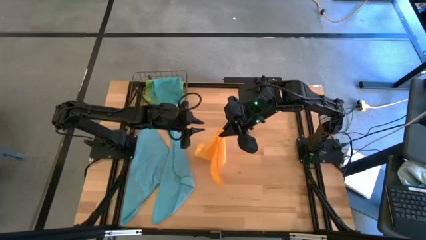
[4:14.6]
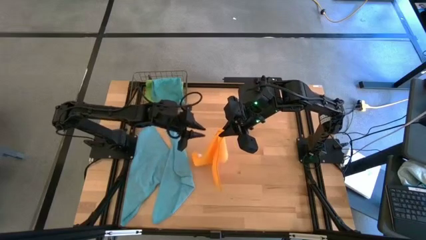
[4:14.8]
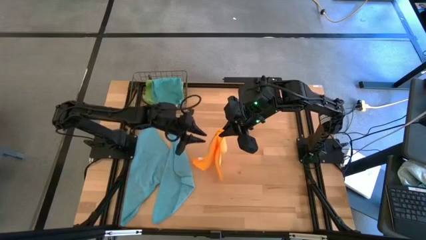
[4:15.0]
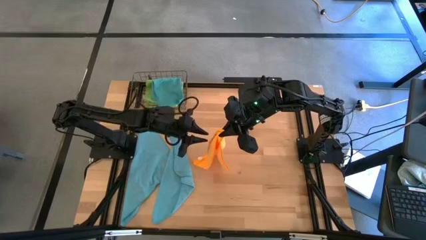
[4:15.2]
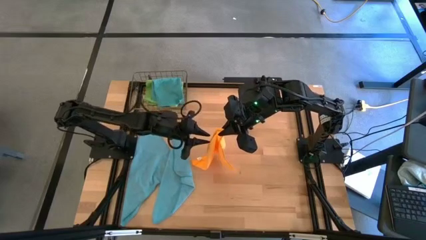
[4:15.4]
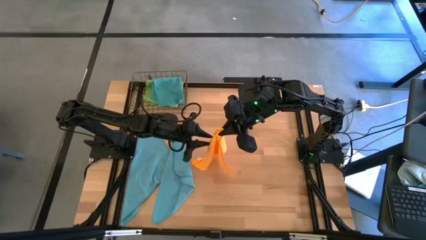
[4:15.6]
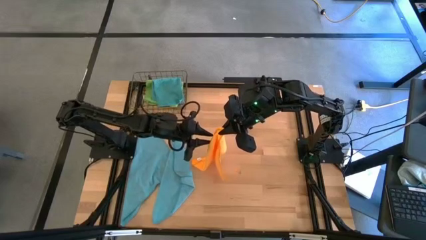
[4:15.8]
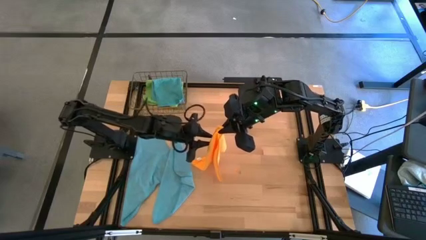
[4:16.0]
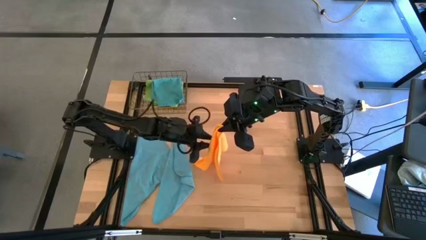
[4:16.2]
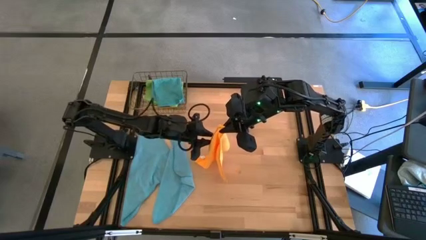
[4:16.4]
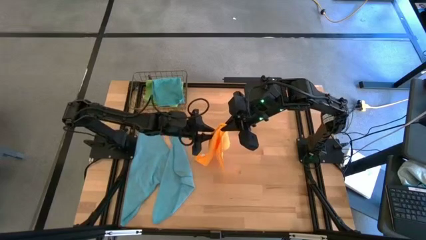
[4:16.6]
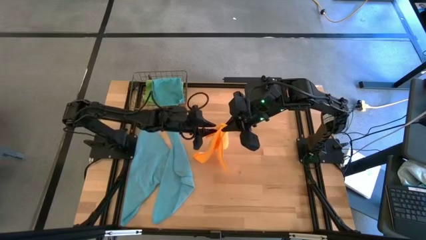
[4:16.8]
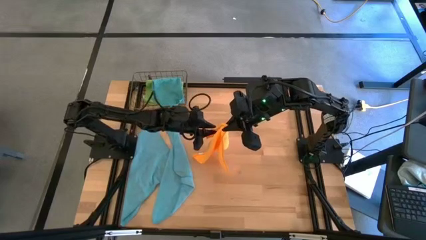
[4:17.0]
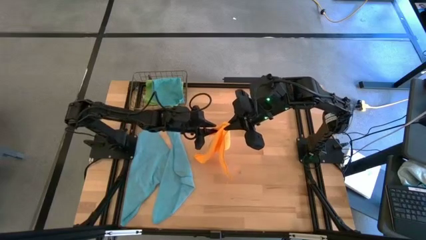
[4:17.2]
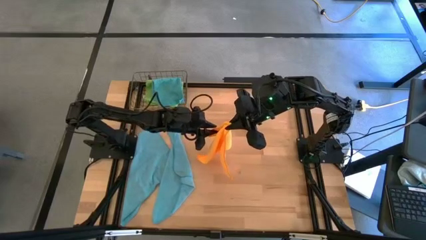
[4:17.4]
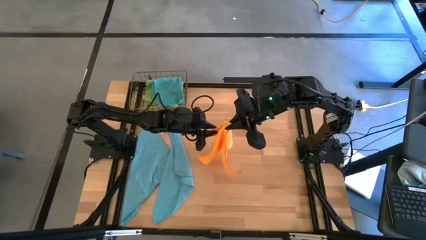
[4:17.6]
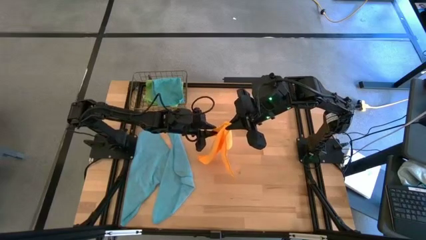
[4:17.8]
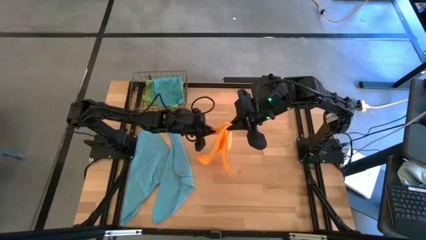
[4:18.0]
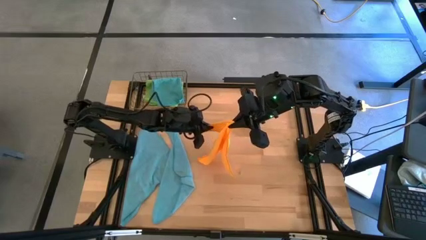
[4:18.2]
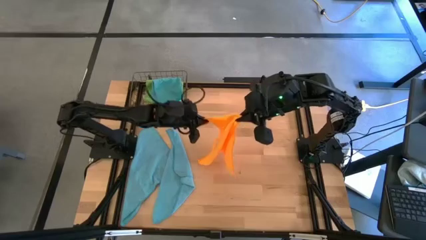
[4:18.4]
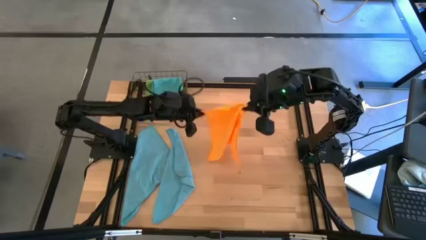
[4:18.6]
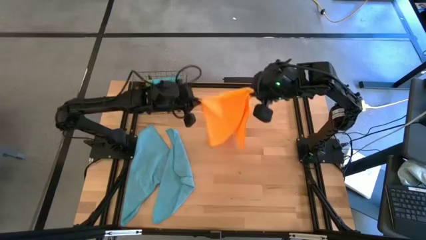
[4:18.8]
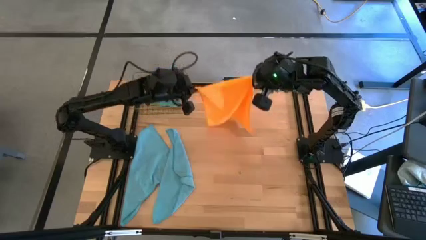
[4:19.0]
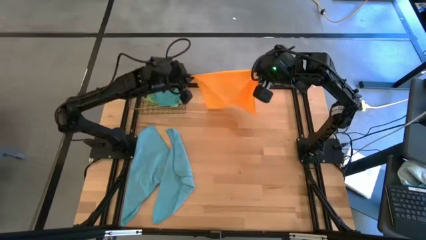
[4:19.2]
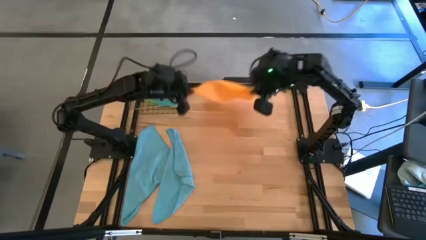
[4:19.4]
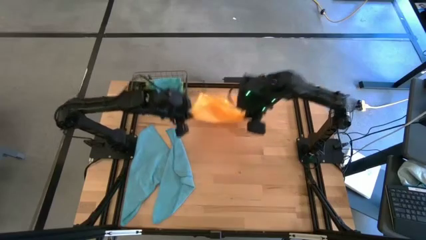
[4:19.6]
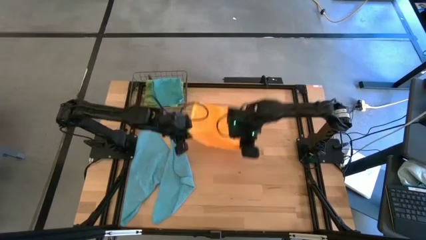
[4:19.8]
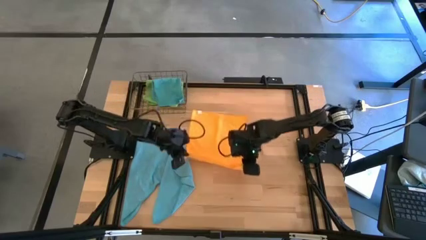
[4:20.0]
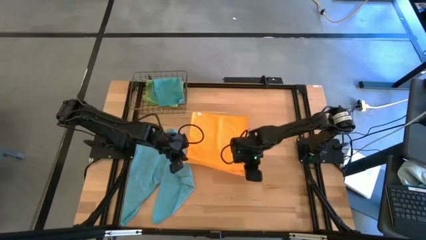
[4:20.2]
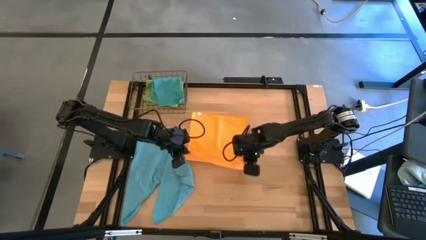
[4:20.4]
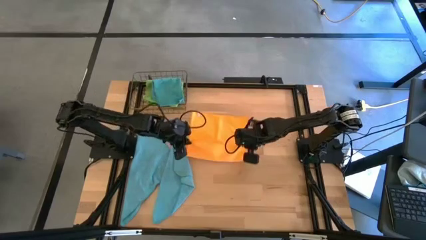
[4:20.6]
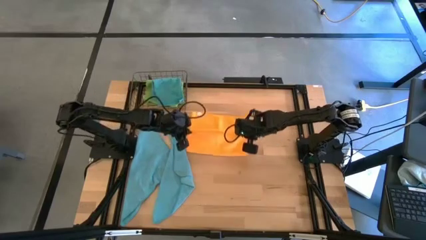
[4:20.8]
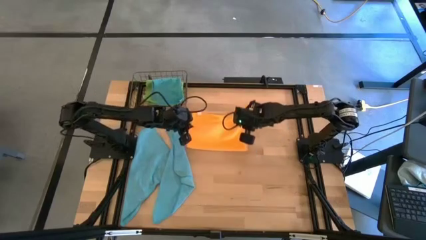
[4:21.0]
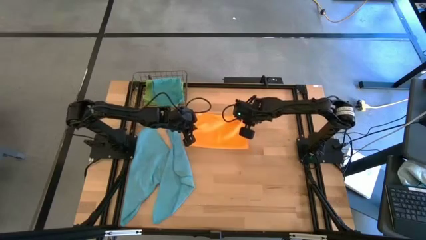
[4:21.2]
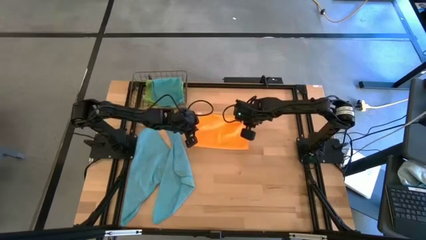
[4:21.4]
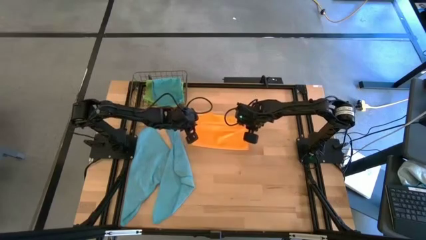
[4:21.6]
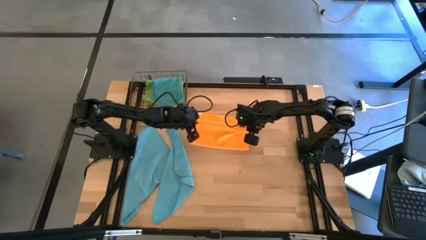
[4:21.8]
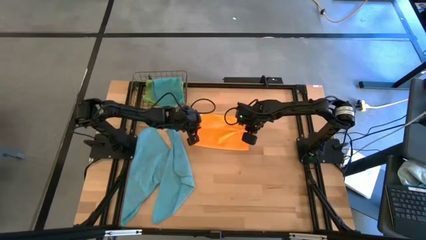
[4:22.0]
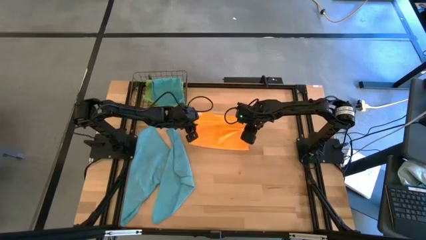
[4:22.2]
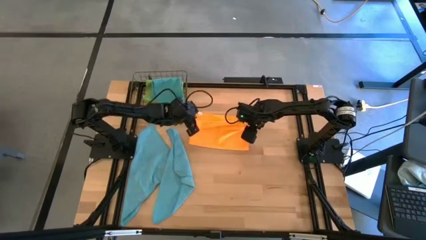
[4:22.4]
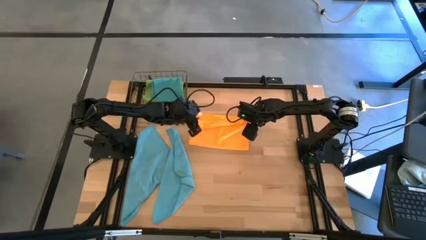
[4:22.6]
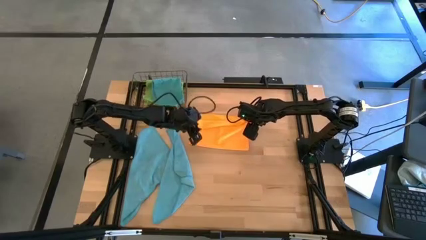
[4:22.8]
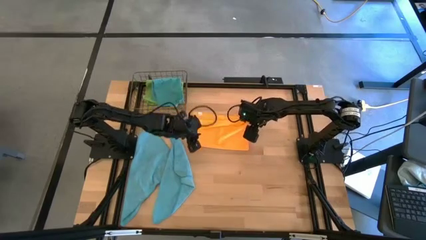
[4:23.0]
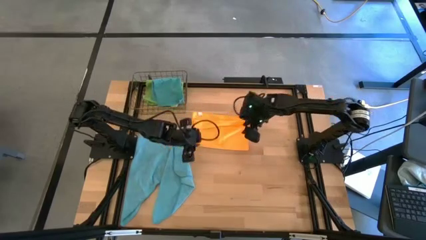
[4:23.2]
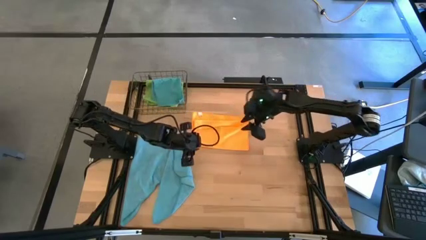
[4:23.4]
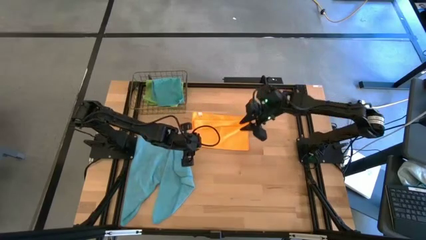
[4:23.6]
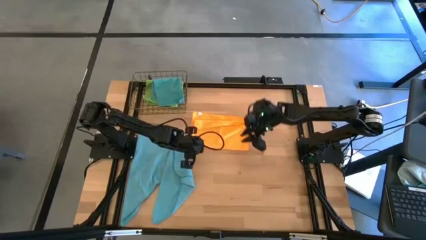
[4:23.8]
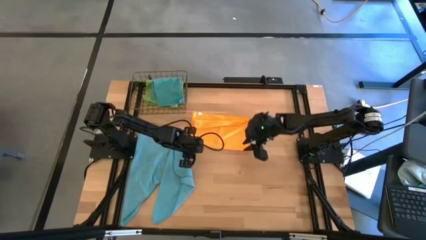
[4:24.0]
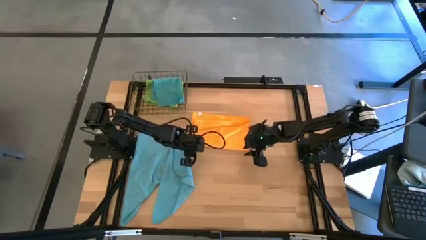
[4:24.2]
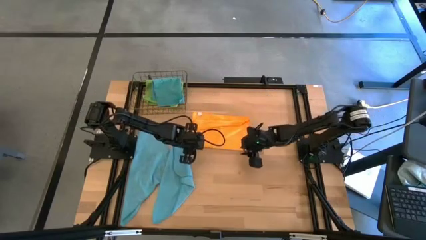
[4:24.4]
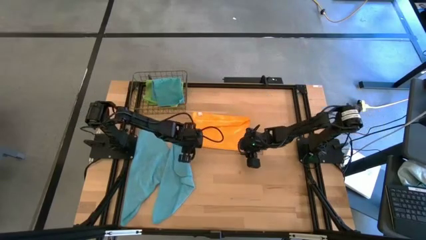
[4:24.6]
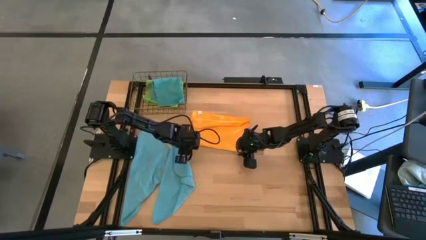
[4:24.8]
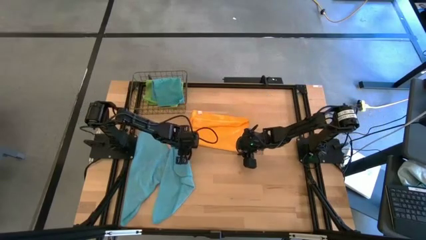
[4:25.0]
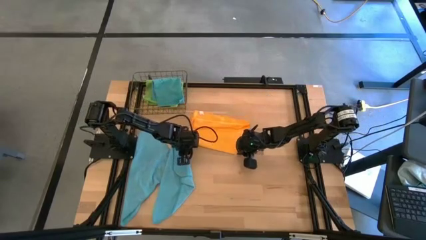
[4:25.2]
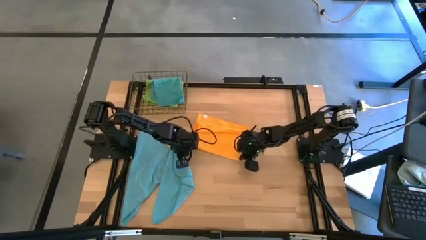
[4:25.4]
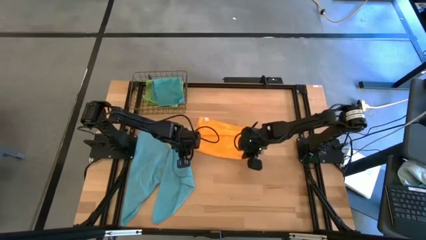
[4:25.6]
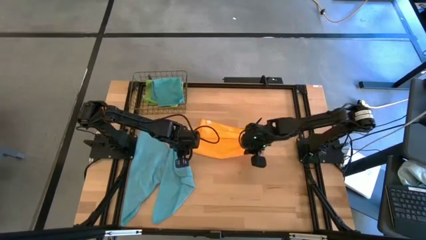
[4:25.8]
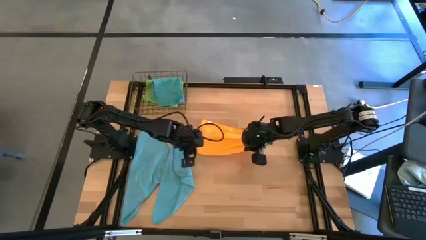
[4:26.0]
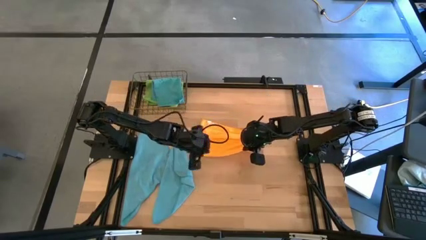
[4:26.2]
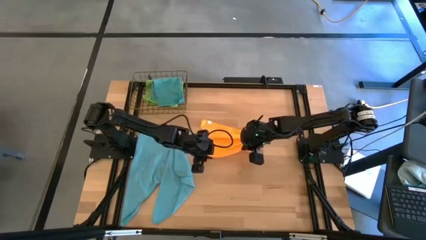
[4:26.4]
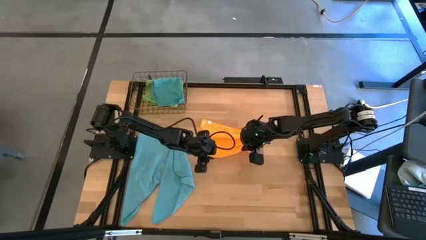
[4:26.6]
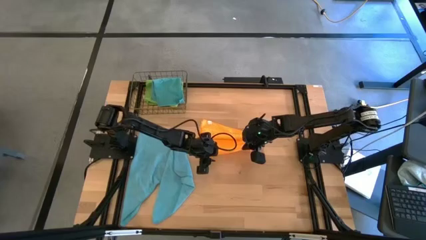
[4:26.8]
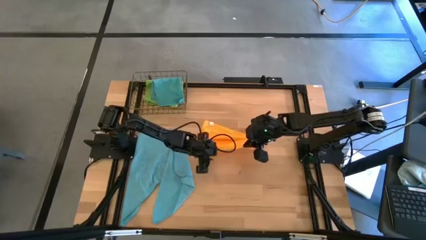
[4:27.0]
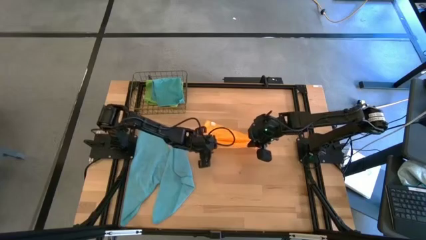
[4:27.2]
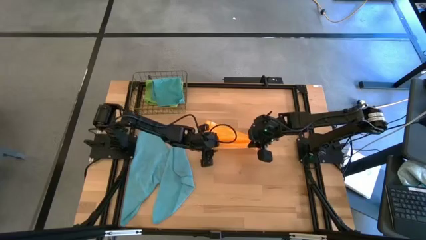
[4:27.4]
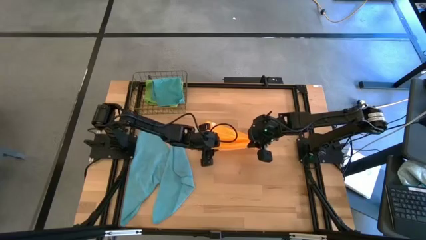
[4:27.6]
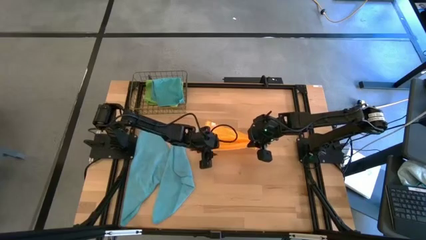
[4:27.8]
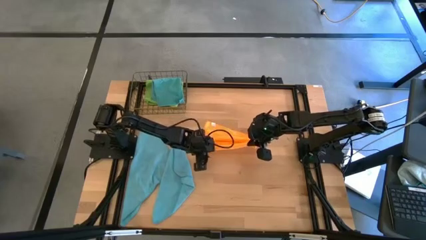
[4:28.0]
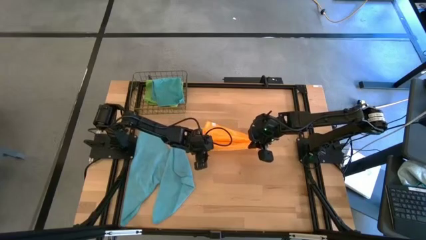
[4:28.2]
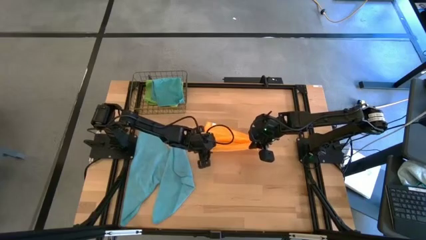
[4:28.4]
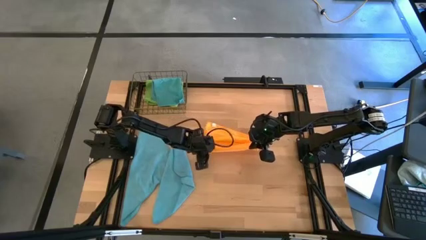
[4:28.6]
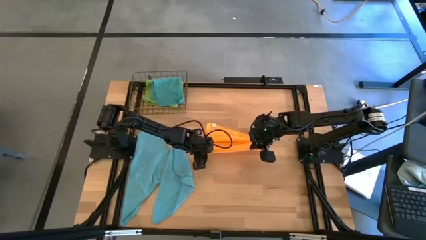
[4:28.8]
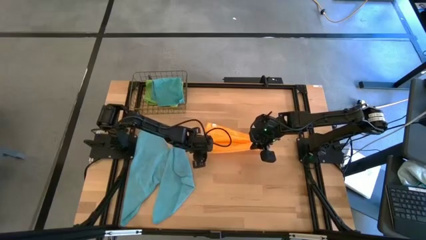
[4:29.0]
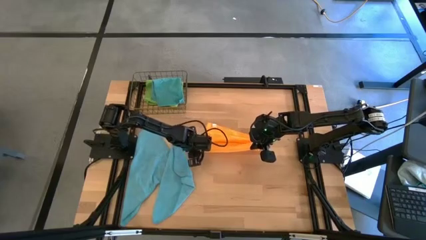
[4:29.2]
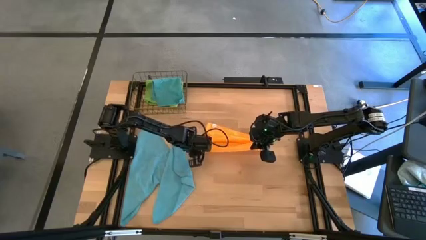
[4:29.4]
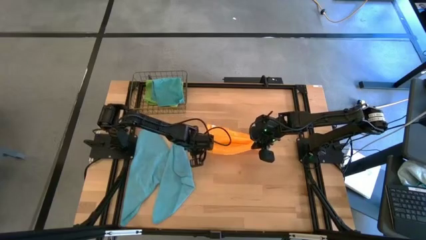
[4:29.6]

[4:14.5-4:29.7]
Task: Fold microfiber towels
Fold the orange microfiber cloth
